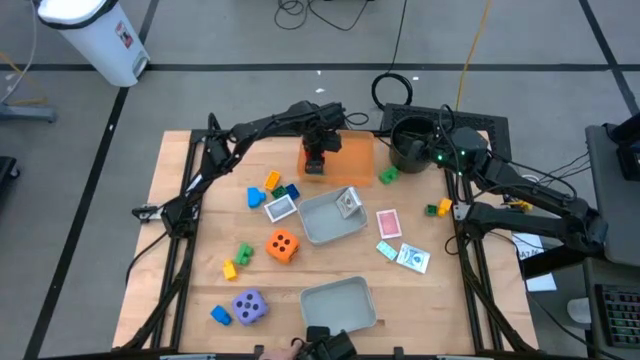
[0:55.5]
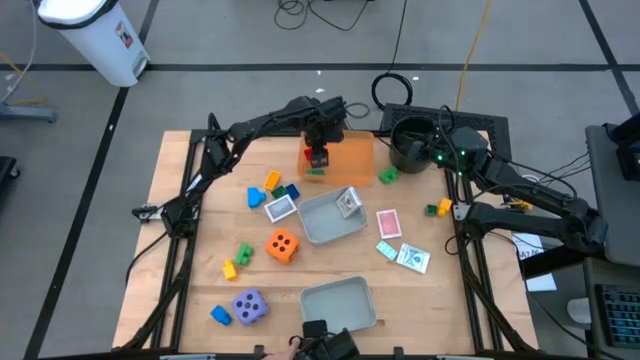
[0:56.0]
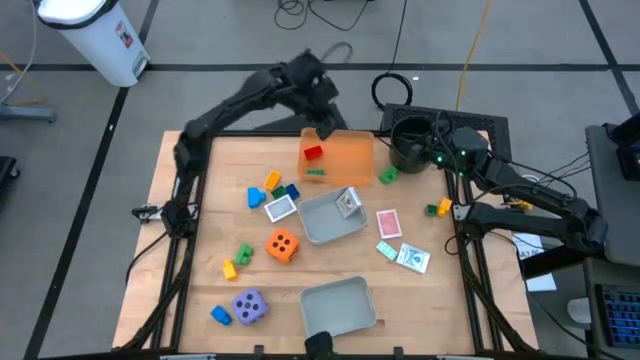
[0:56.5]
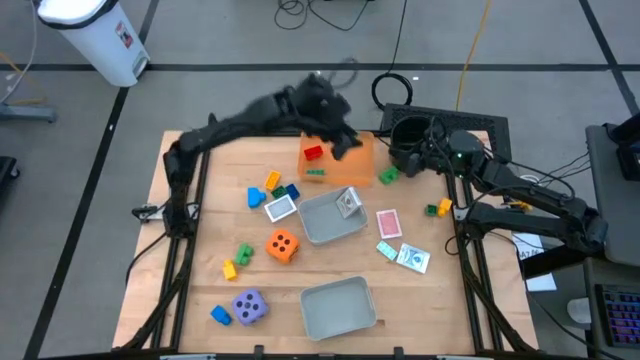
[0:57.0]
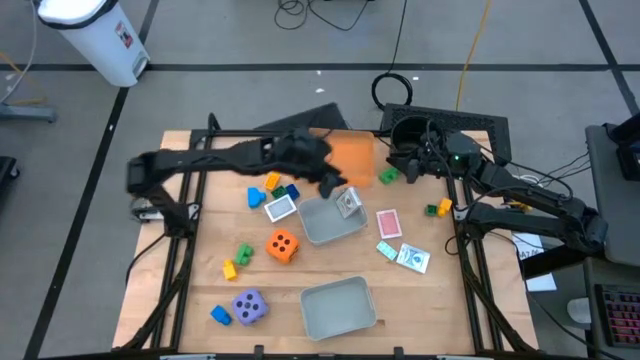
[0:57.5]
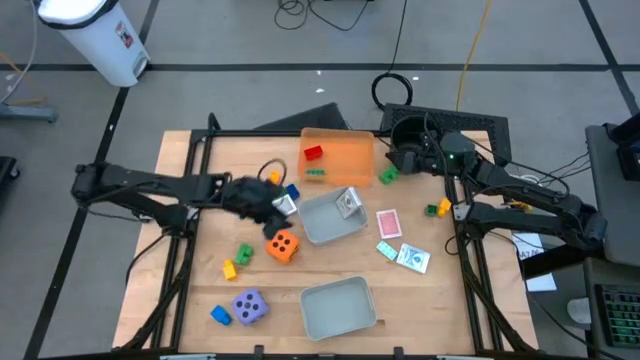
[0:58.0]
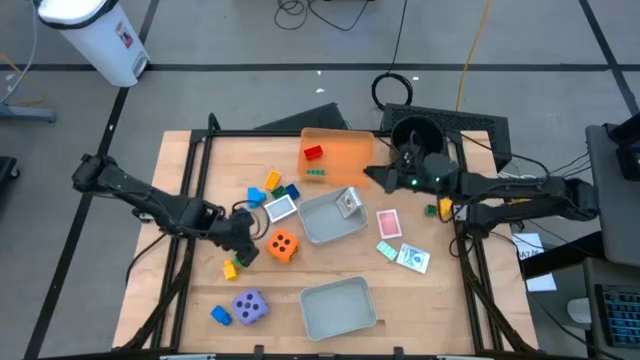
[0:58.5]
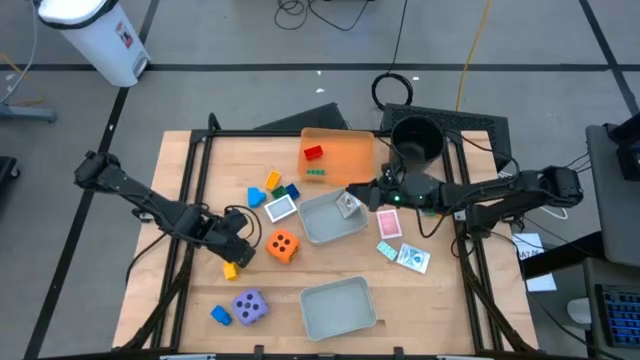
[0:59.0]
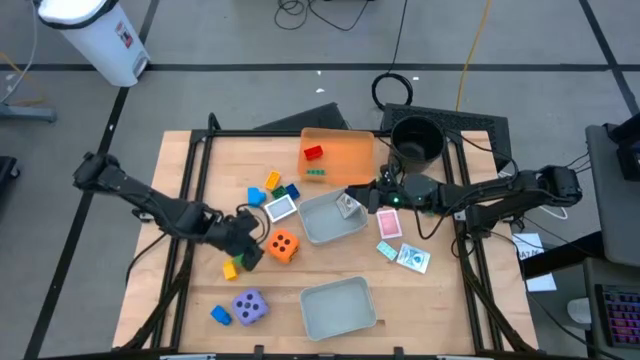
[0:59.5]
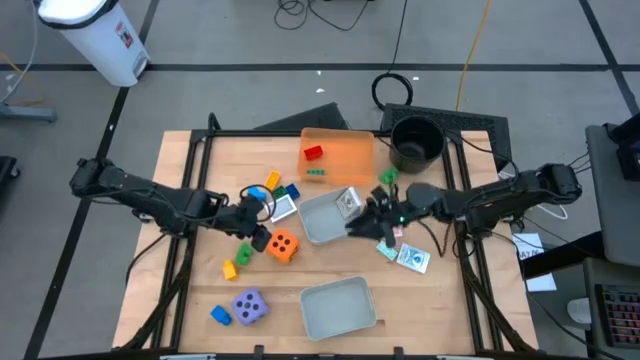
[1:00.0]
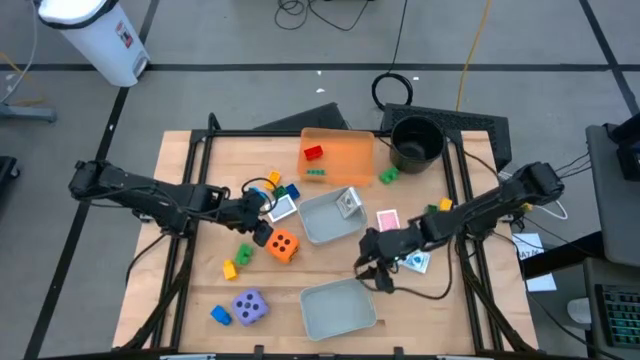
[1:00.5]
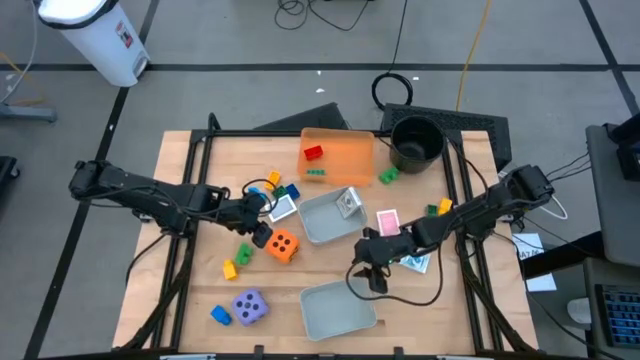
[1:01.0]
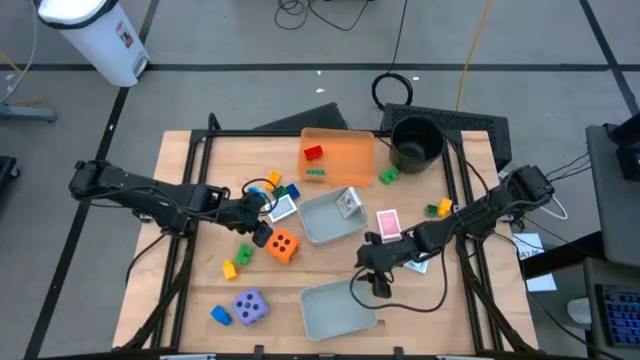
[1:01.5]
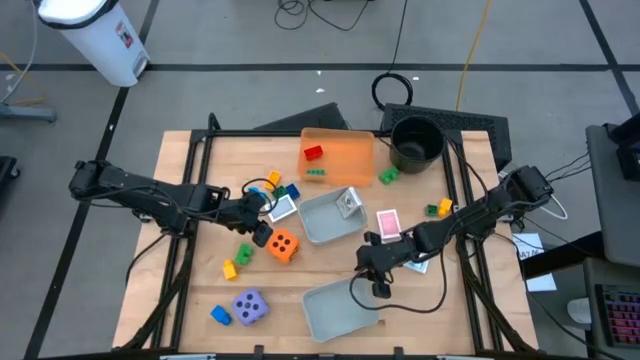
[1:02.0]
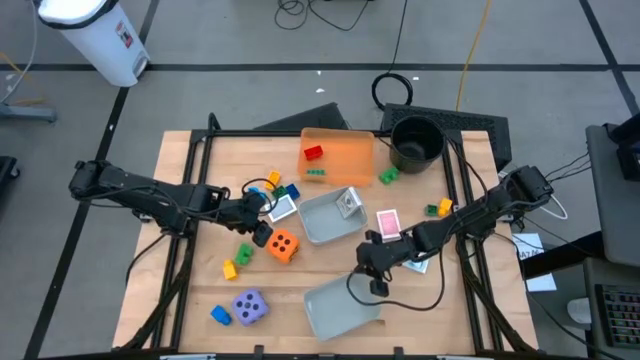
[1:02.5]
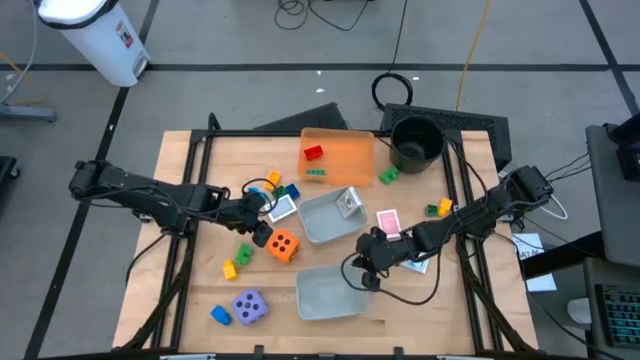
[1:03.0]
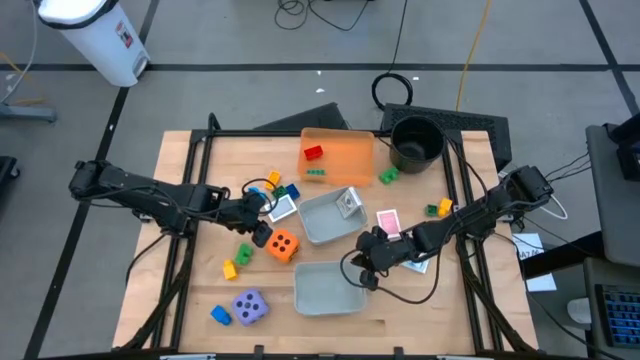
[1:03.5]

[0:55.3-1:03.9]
Task: Pick & Place Toys
Adjust the bottom gray bin

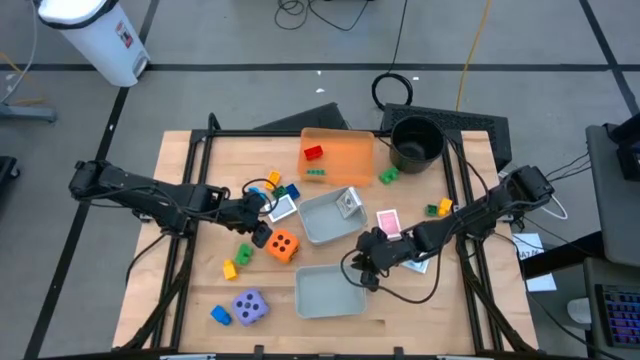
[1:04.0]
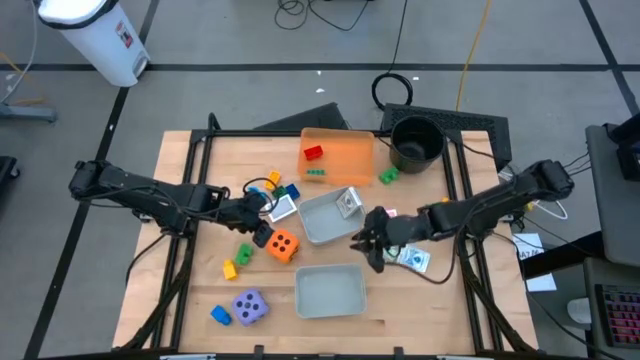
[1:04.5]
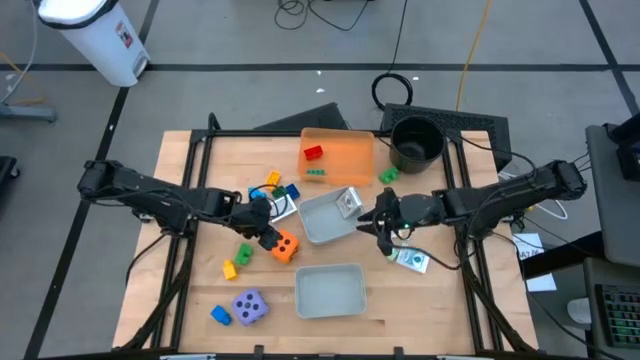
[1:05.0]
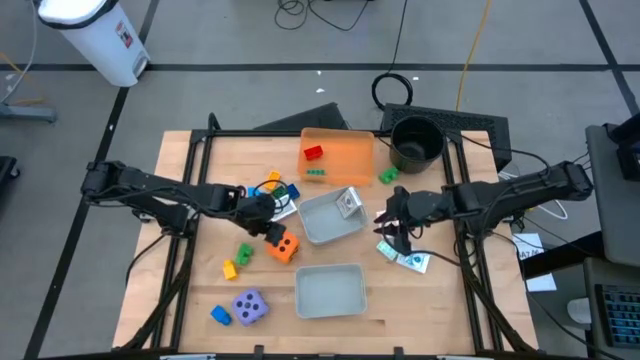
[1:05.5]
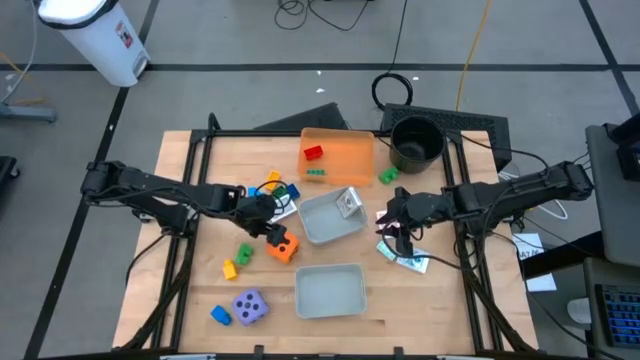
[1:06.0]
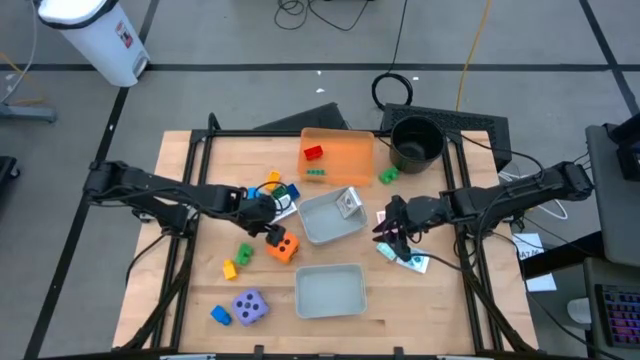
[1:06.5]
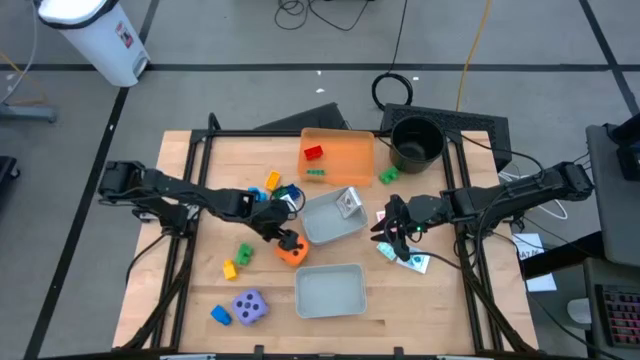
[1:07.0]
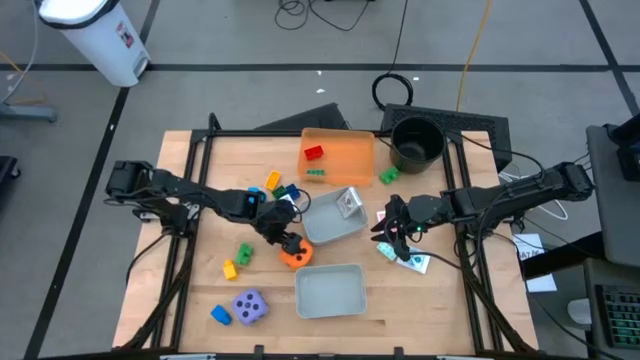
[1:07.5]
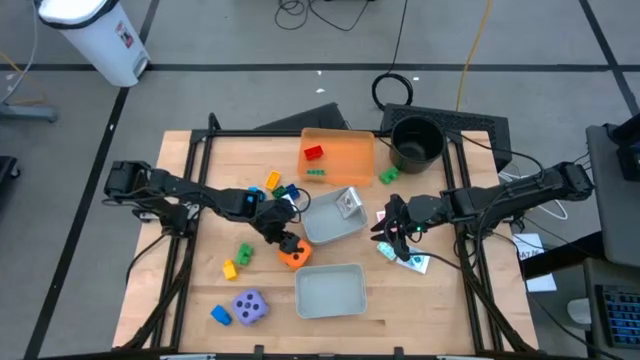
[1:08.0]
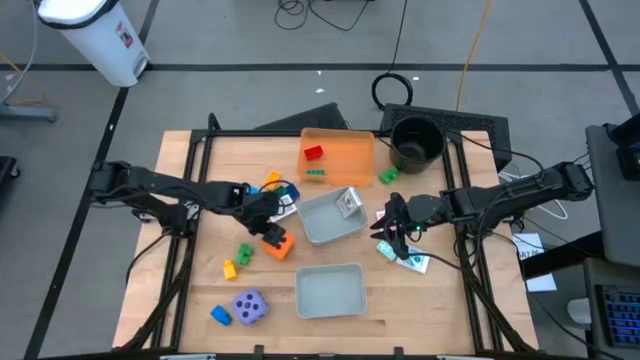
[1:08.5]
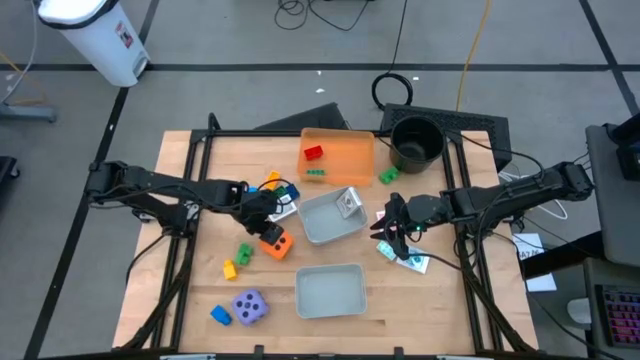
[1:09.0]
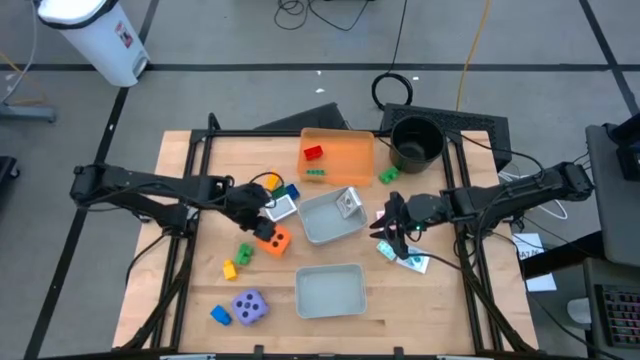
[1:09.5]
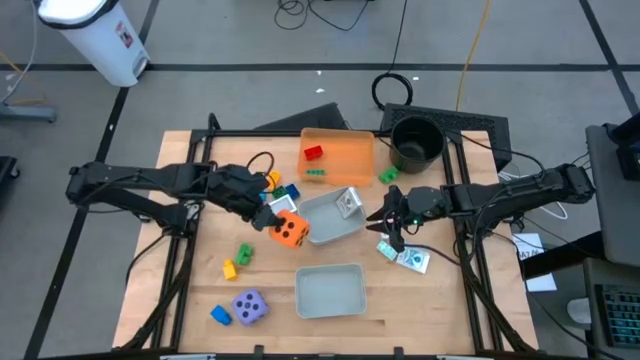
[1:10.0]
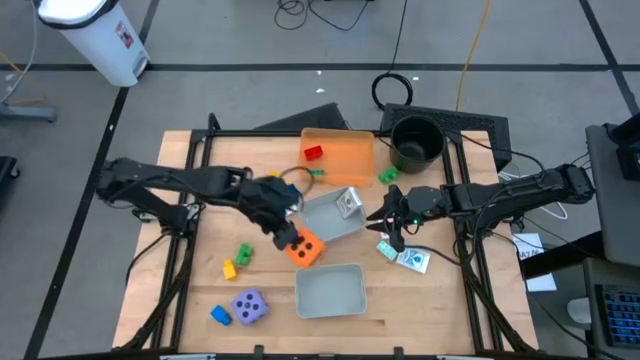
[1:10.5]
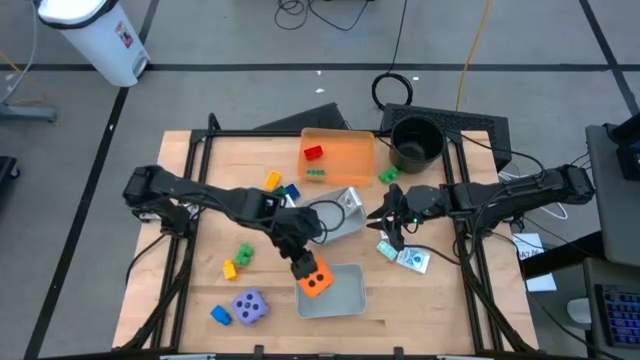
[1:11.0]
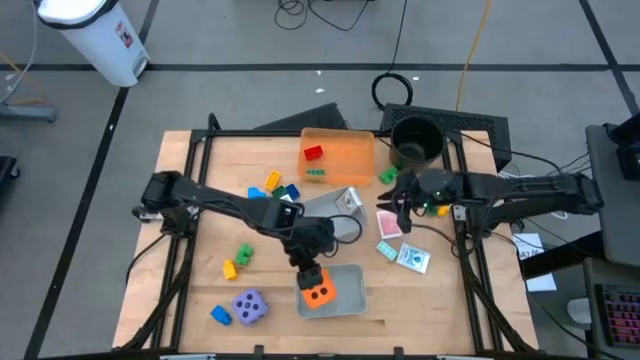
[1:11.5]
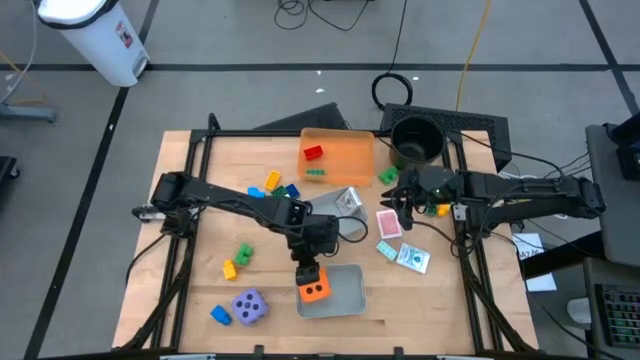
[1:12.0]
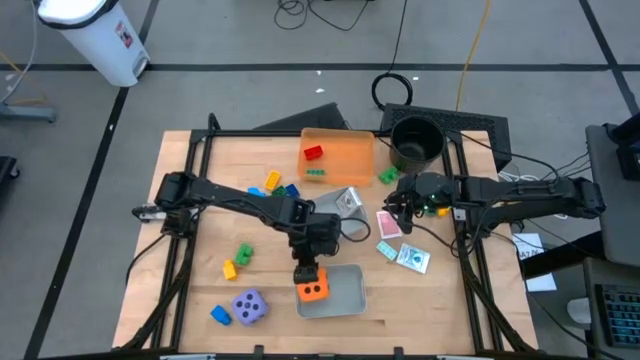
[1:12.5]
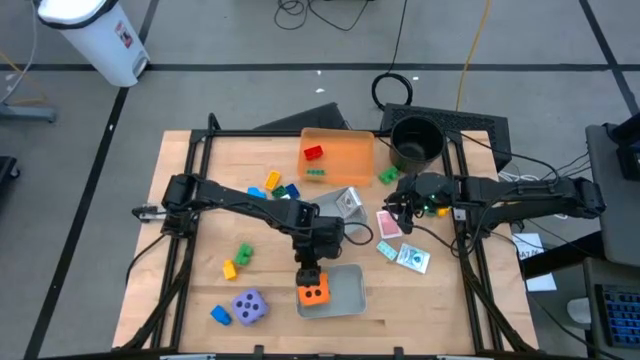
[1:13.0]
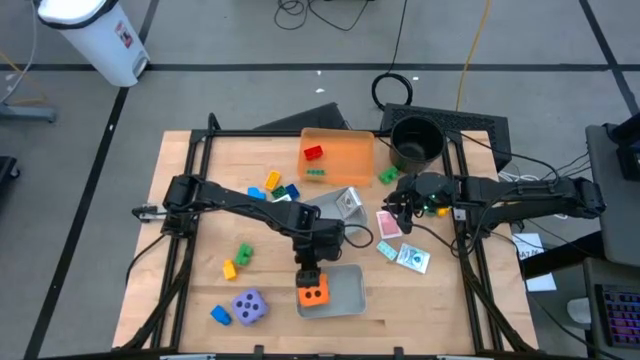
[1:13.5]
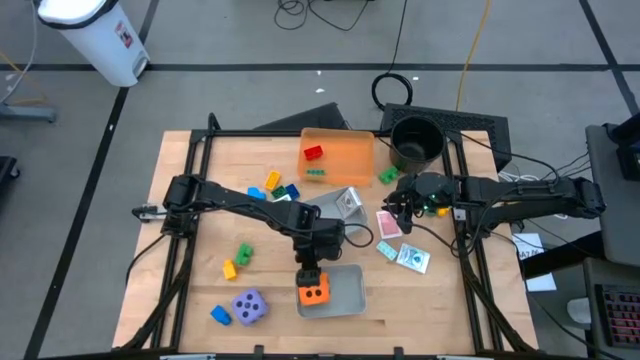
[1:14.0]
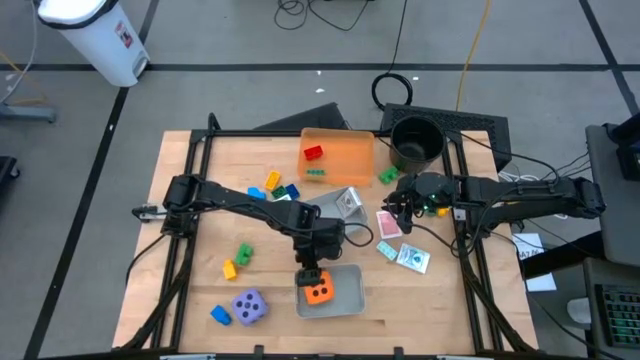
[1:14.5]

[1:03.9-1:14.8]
Put the orange dice into the bottom gray bin

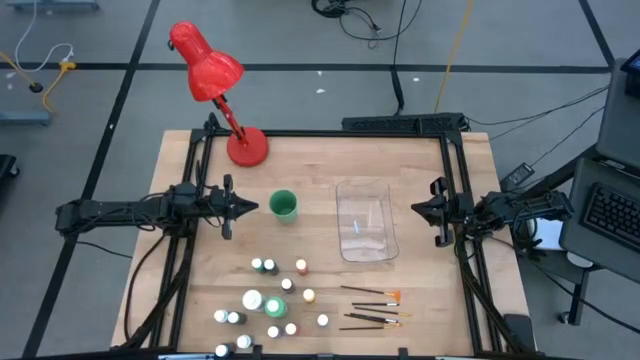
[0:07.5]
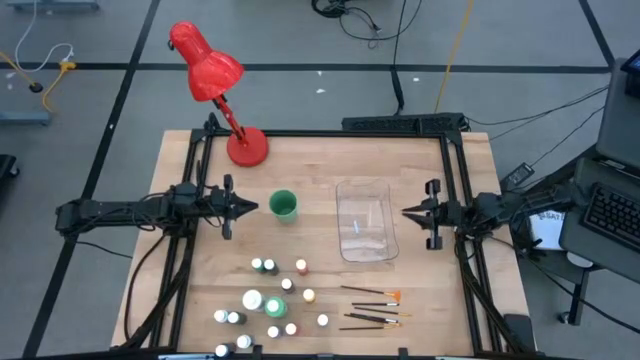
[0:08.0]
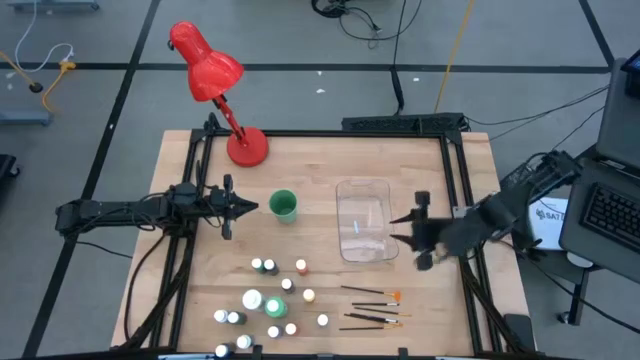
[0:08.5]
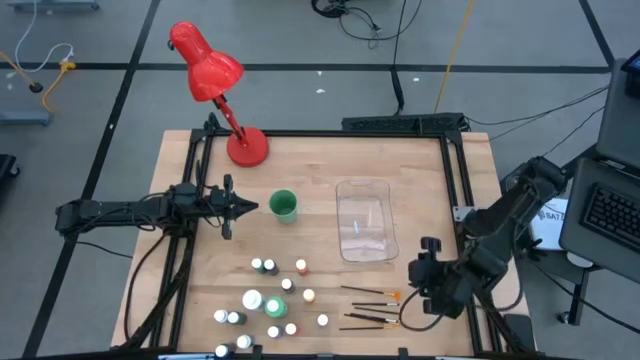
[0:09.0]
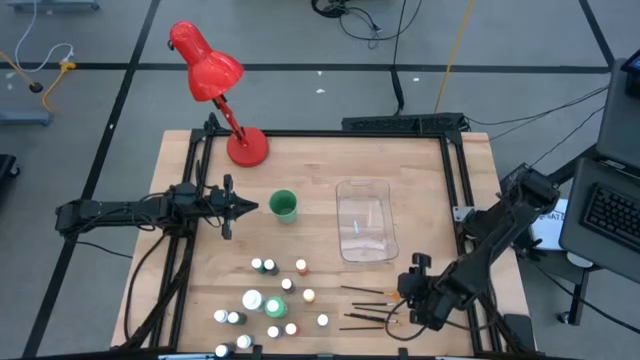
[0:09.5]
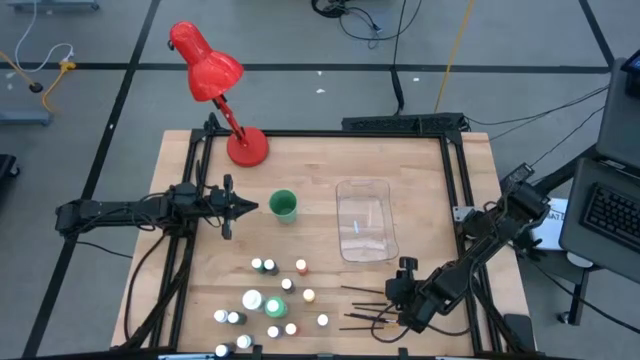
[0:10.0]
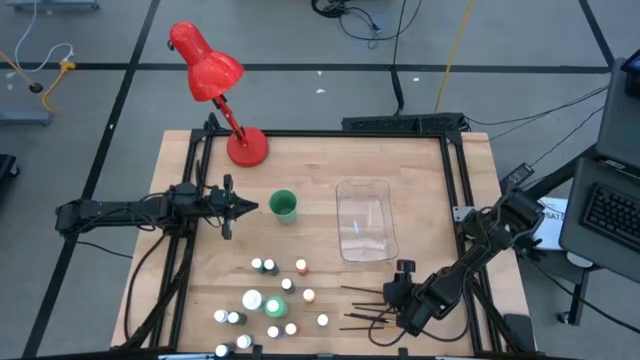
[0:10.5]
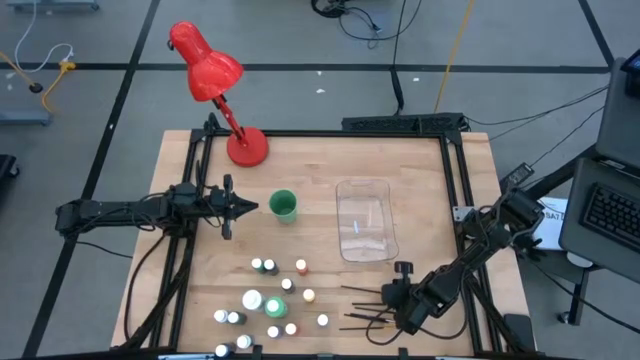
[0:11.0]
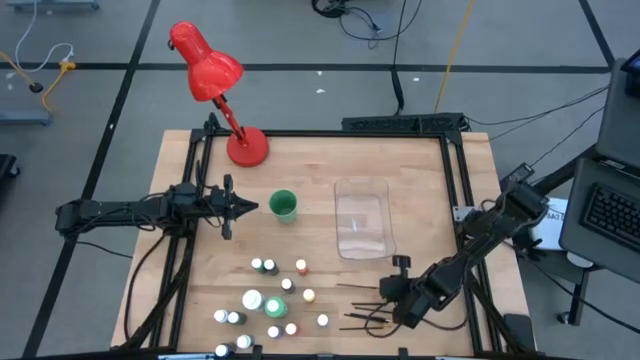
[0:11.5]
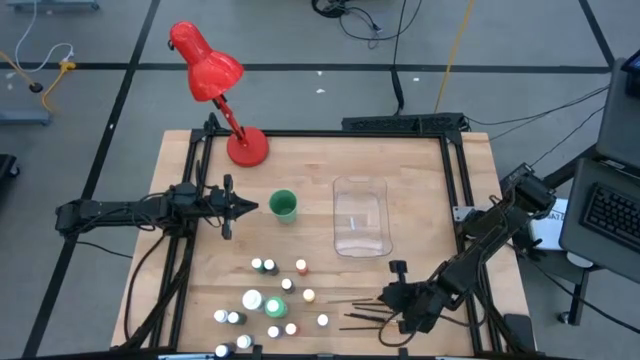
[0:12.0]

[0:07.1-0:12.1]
Task: Pick & Place Paint Supplies
Put the gold paintbrush into the green cup
